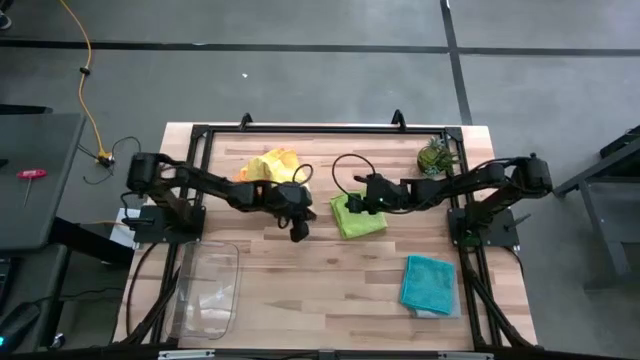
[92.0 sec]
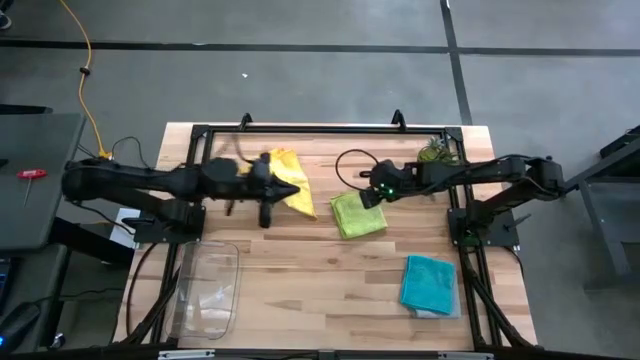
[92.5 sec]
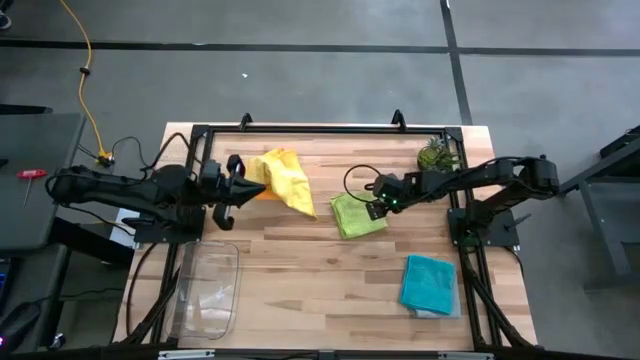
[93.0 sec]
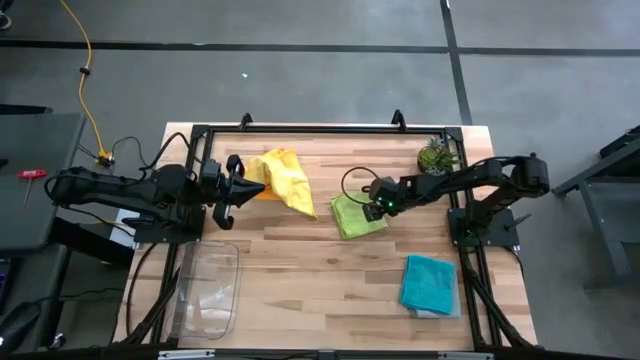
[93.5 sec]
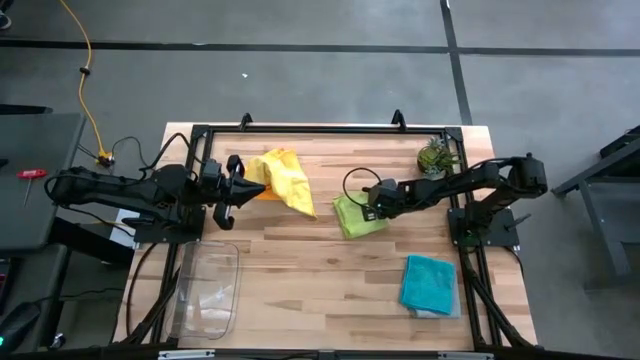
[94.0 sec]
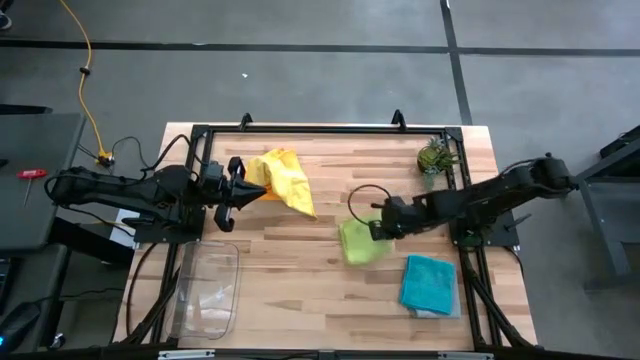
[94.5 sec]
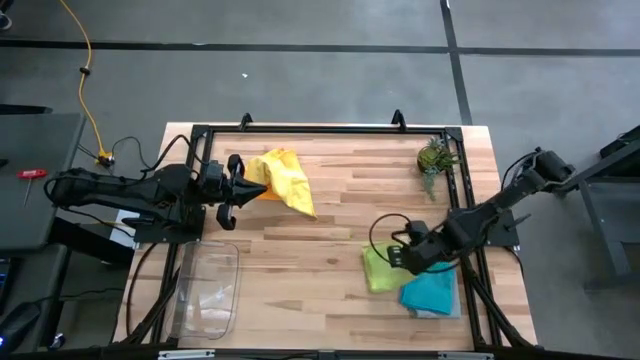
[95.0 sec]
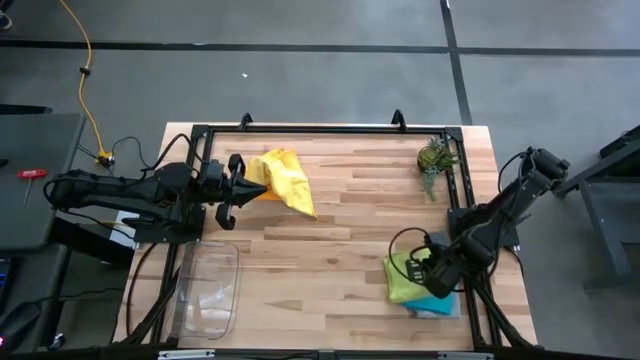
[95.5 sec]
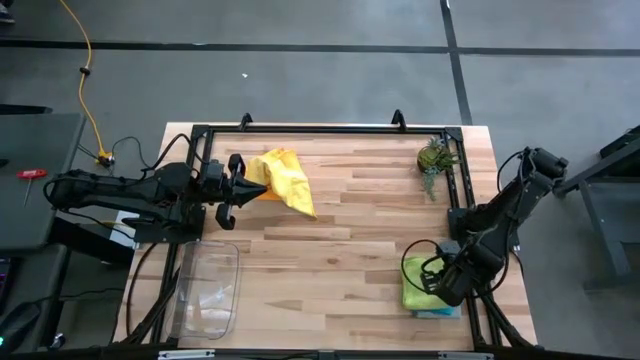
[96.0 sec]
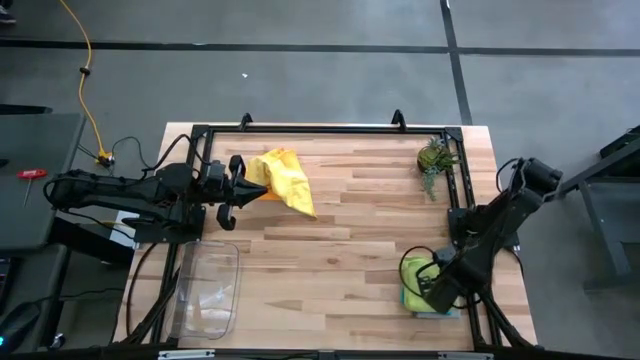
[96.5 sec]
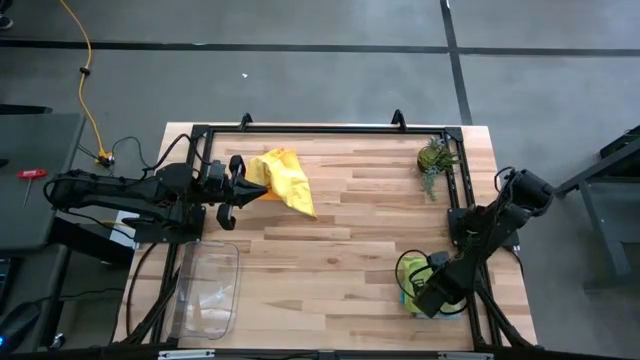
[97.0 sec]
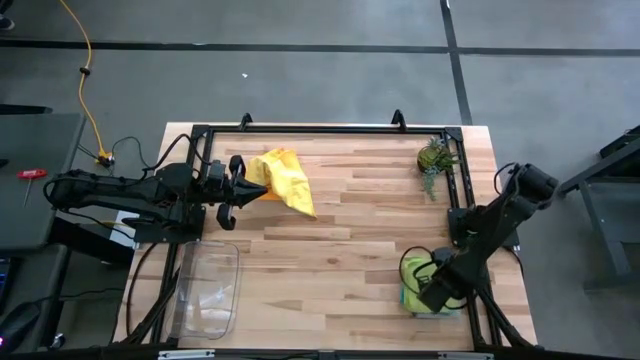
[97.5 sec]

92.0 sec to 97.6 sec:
Task: Fold microfiber towels
Stack the green microfiber cloth on top of the blue microfiber cloth

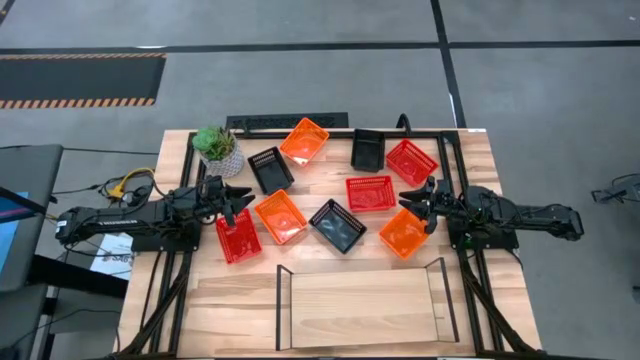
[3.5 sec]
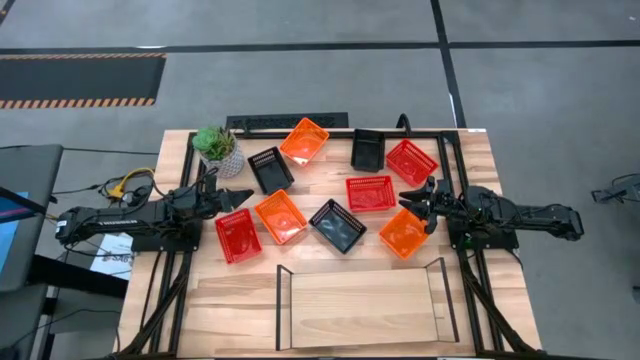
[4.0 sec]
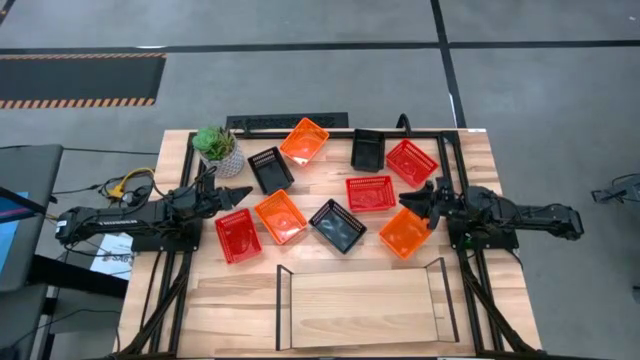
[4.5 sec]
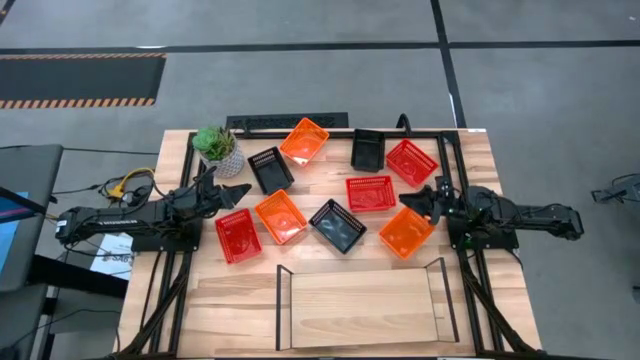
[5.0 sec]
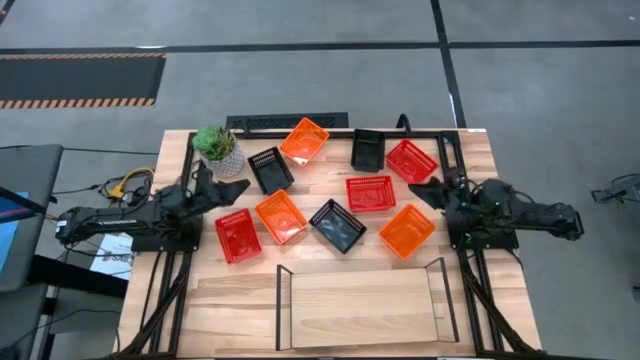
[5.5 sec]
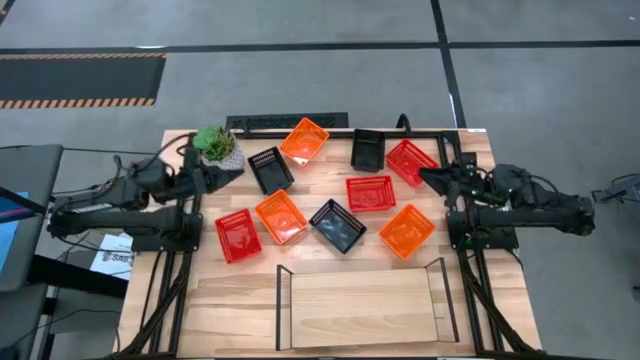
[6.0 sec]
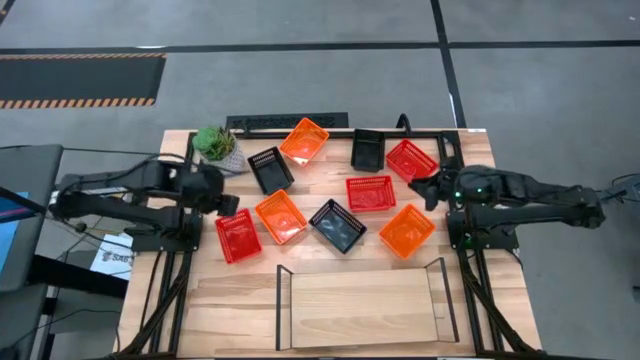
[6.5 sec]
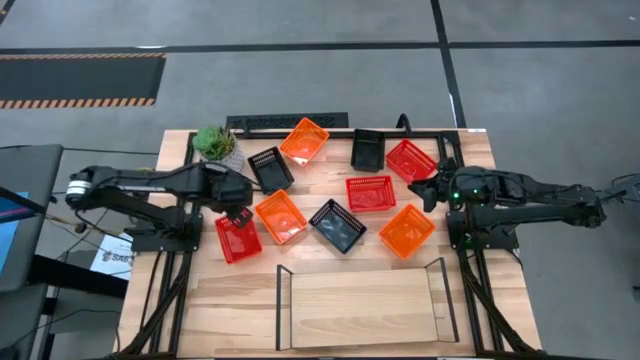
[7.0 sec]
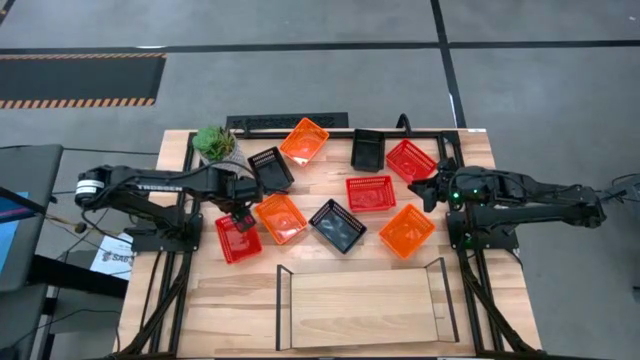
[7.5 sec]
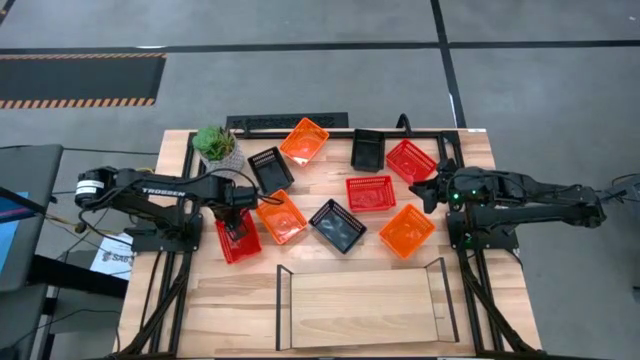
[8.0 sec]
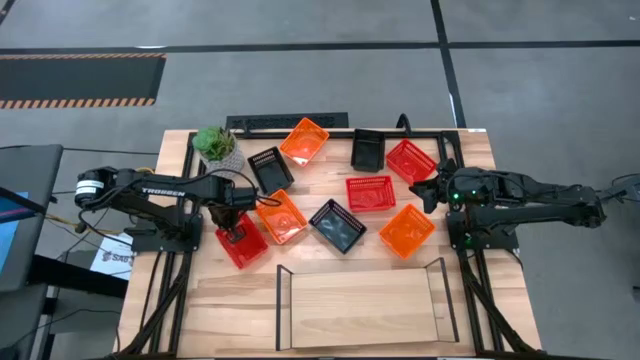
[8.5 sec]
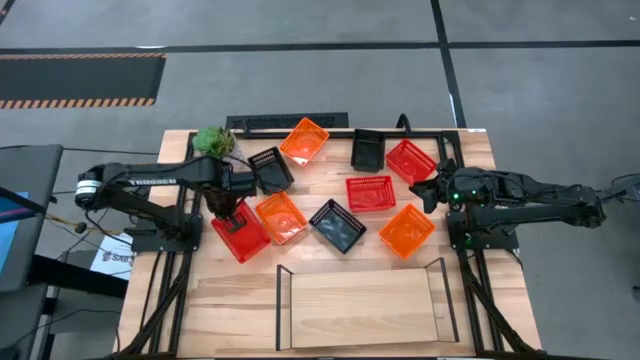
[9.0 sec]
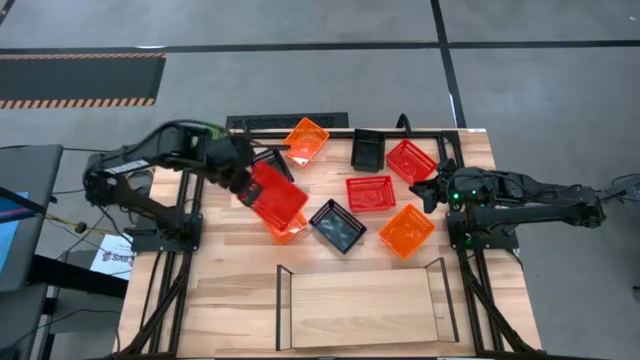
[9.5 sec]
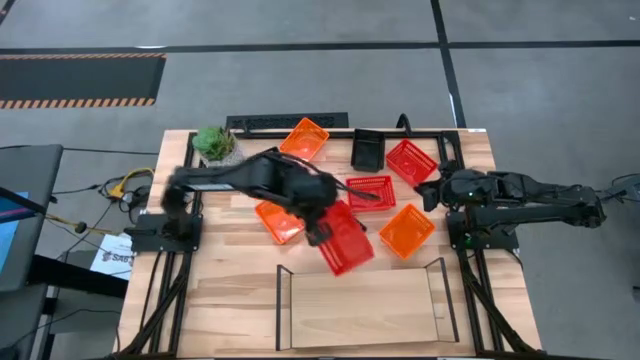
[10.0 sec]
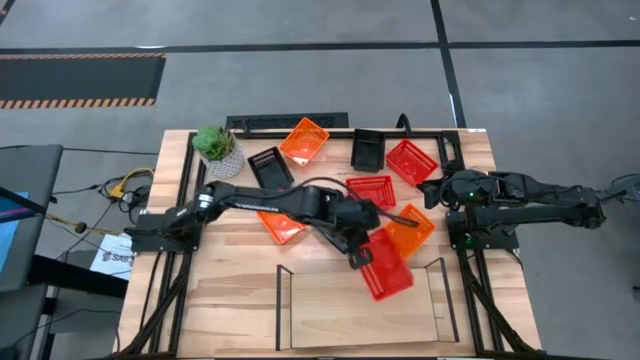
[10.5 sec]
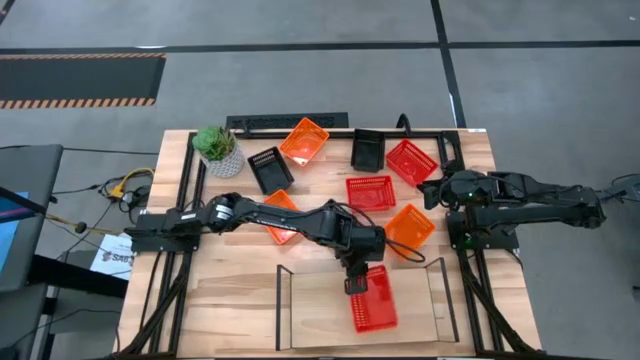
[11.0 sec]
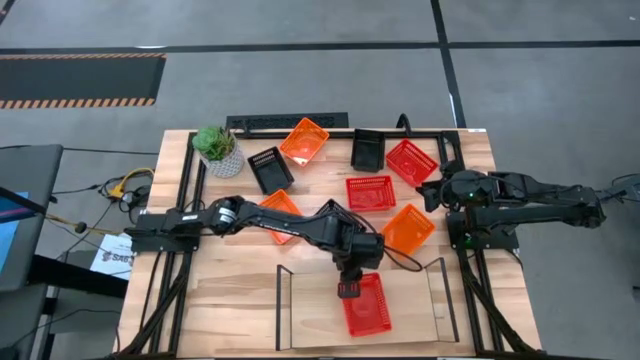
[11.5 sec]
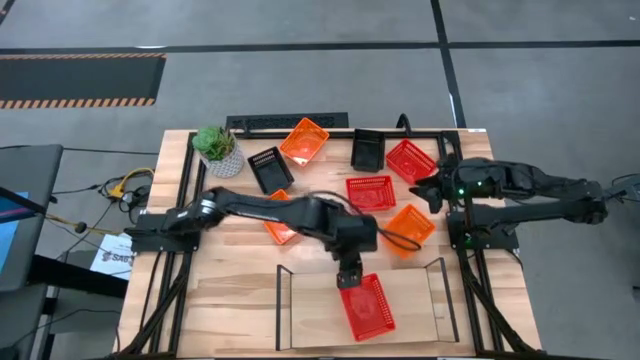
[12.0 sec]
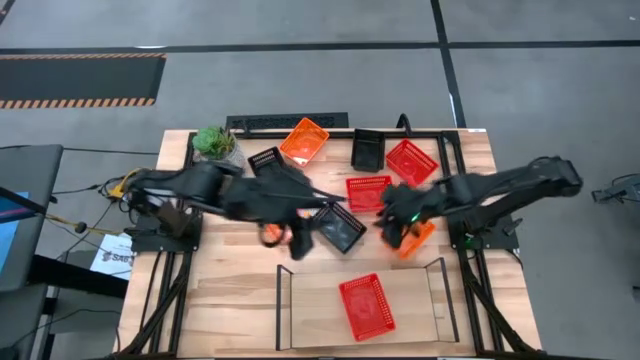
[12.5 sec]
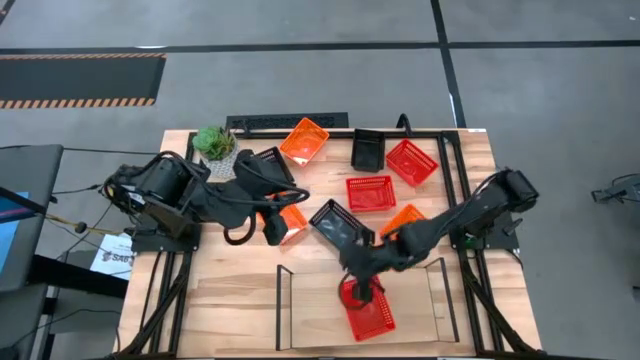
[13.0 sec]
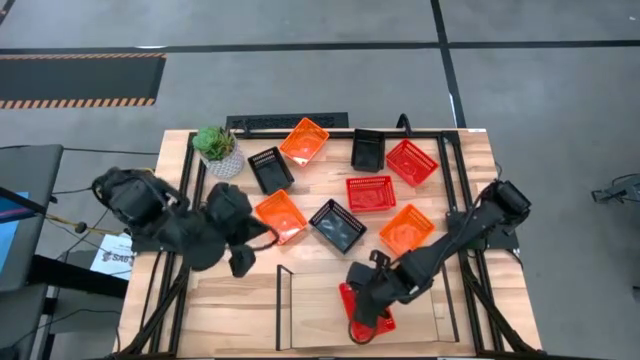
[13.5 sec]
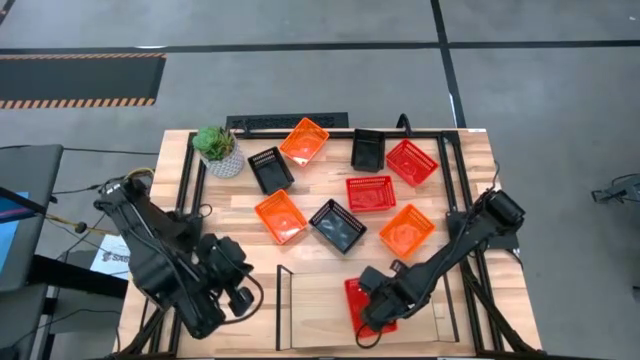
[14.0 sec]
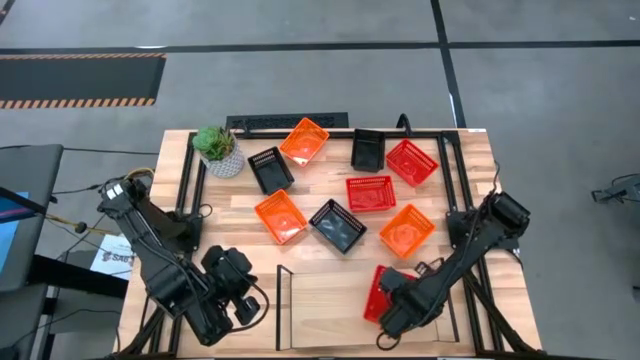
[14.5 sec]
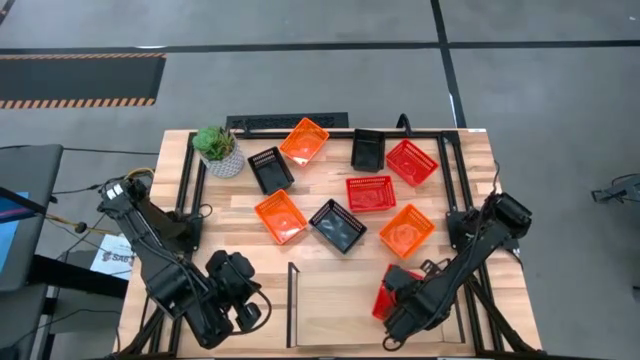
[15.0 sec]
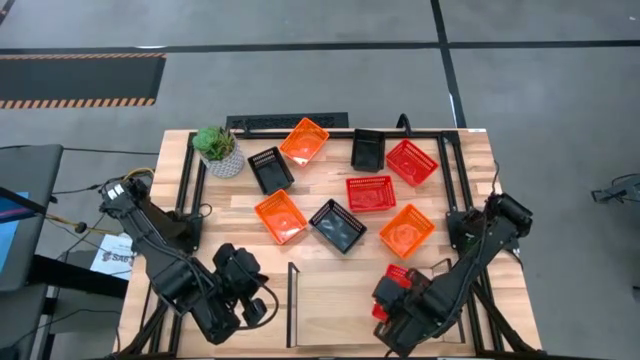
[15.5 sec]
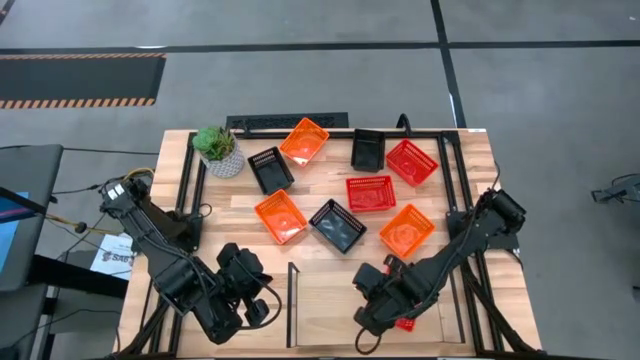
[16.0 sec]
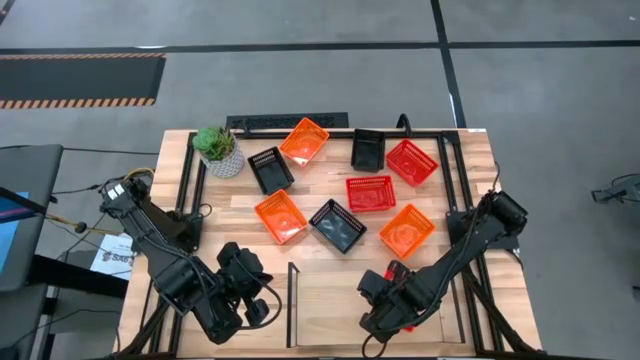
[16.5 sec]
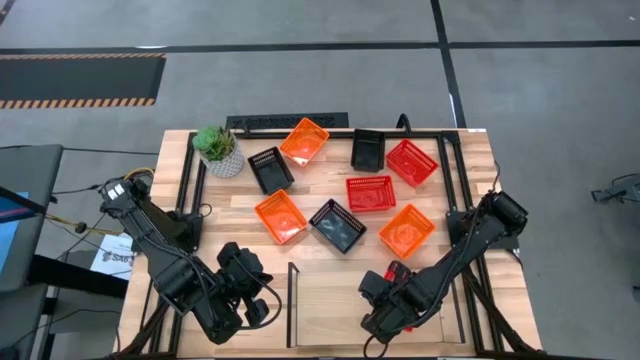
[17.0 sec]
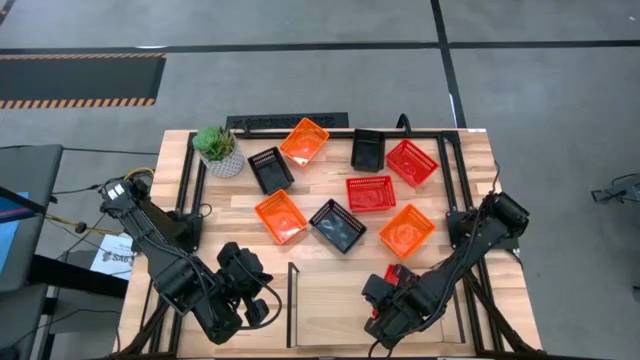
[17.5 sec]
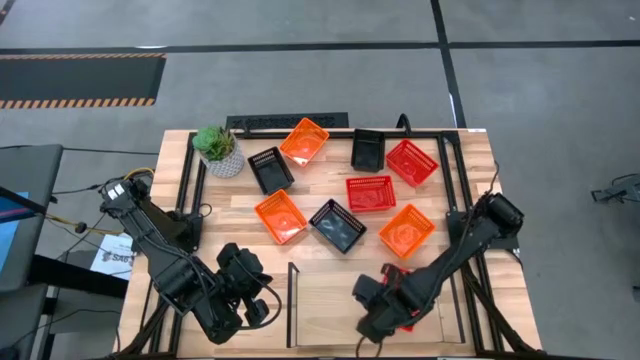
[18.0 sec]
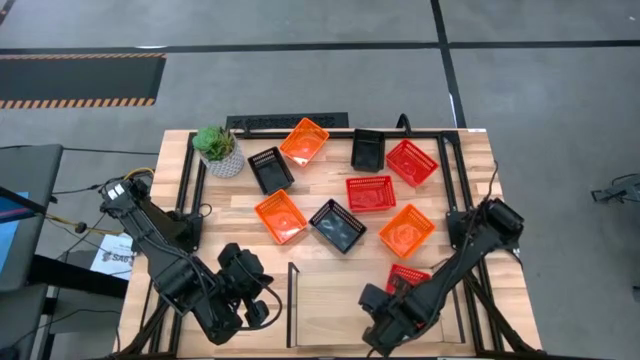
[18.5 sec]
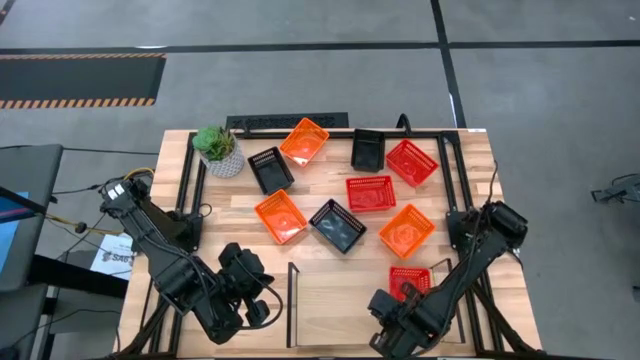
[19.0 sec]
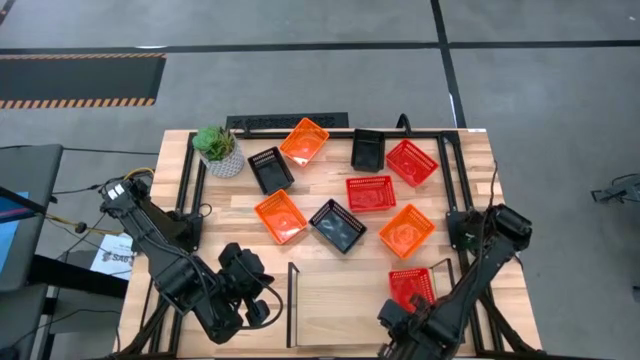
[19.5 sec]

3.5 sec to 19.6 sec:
Task: Stack baskets on shelf by color
Put the bottom left red bin on the shelf
